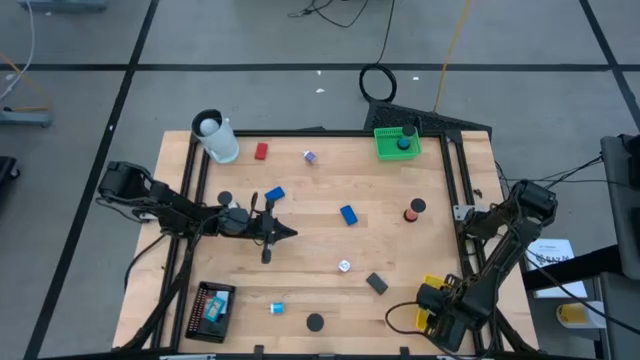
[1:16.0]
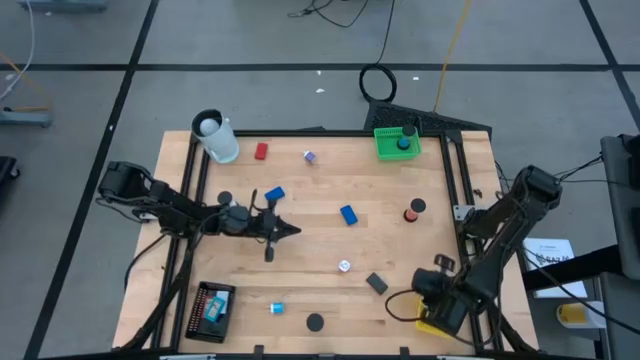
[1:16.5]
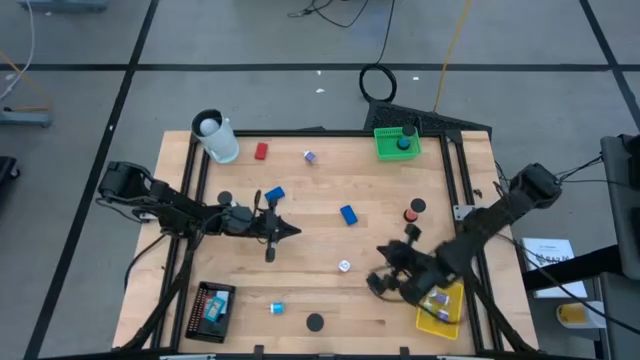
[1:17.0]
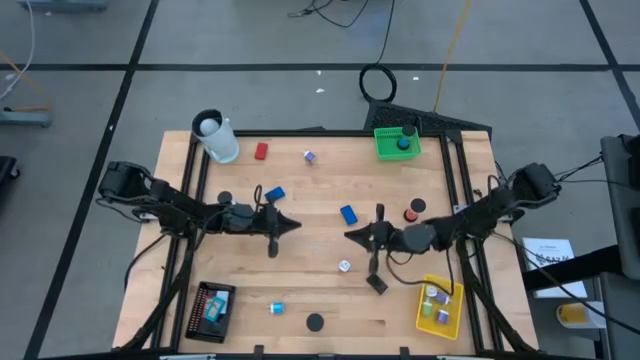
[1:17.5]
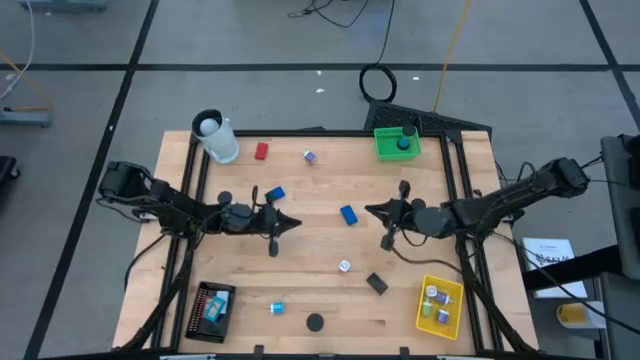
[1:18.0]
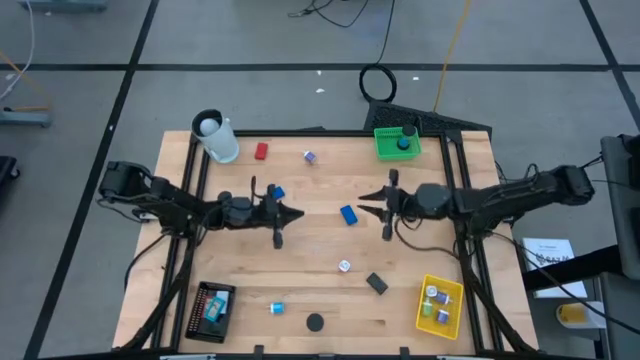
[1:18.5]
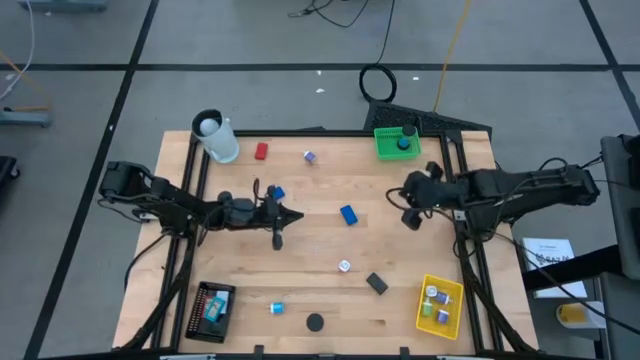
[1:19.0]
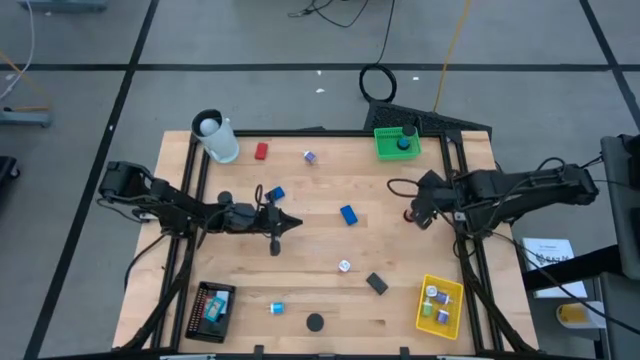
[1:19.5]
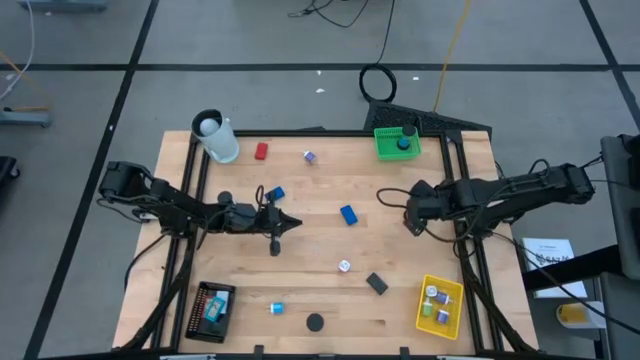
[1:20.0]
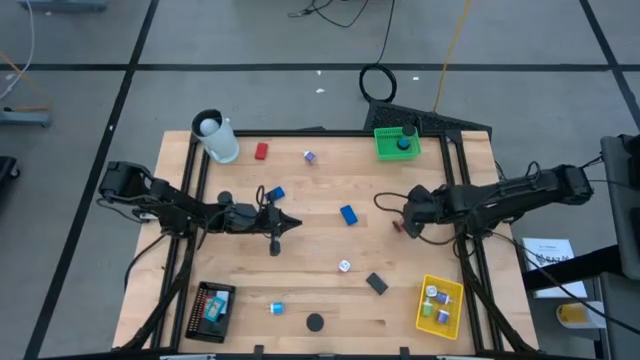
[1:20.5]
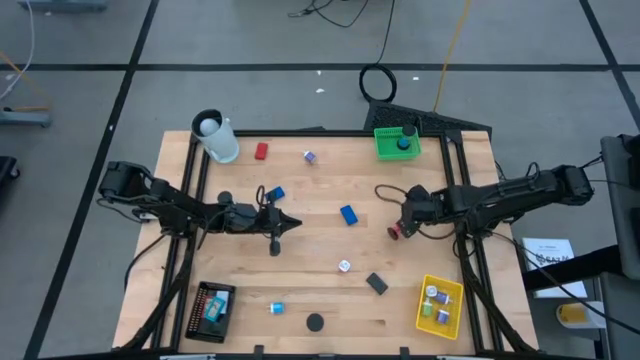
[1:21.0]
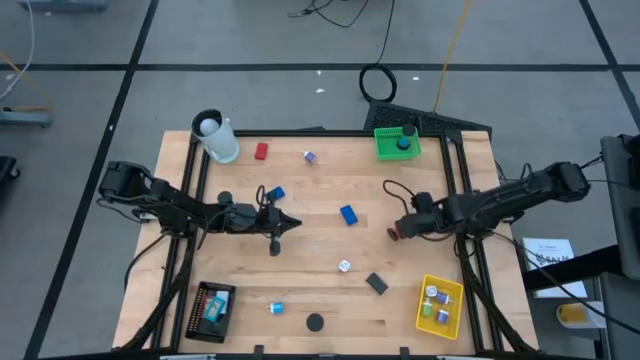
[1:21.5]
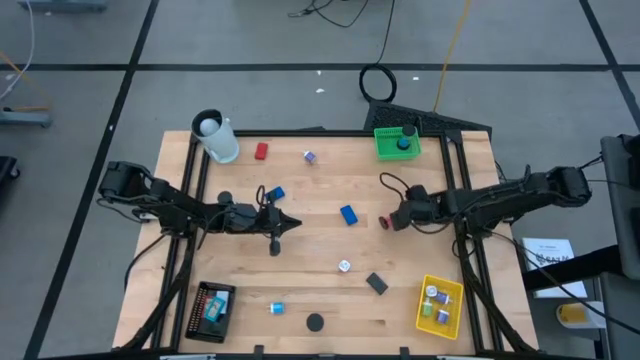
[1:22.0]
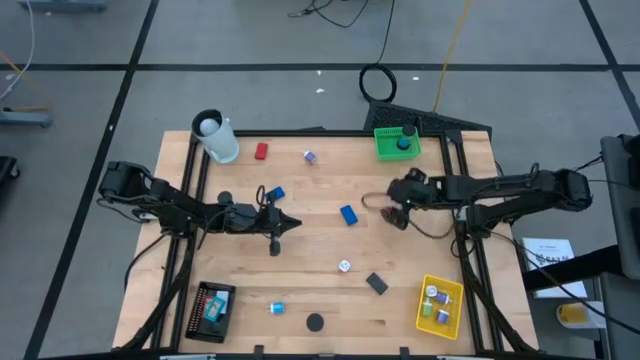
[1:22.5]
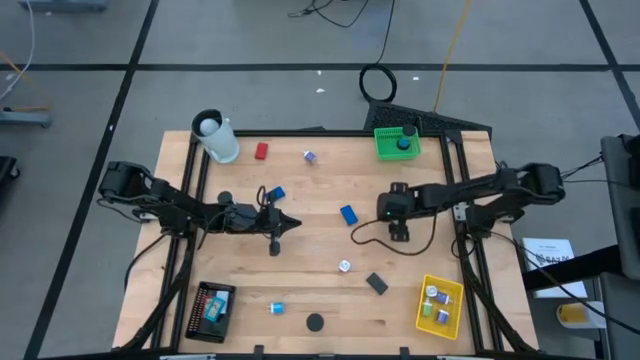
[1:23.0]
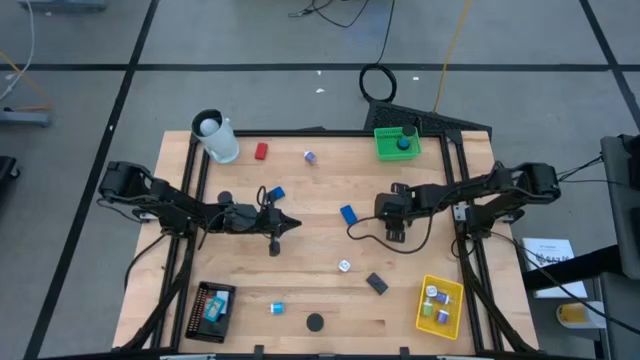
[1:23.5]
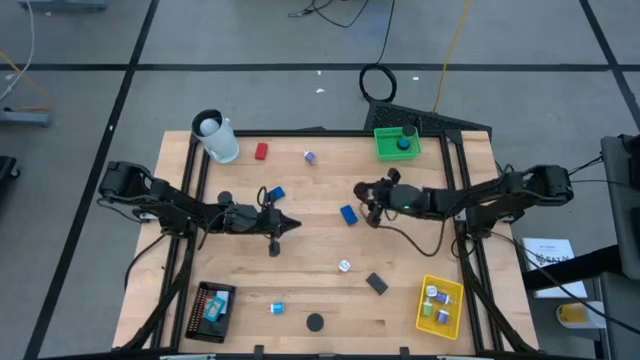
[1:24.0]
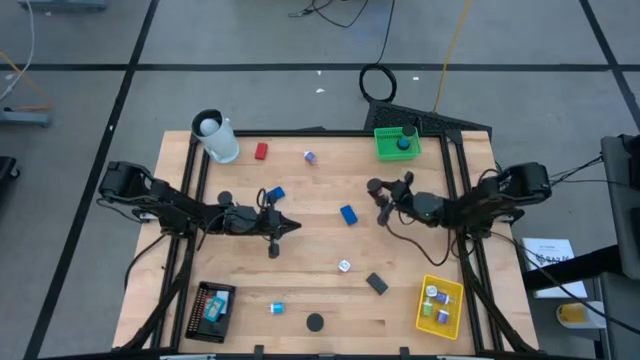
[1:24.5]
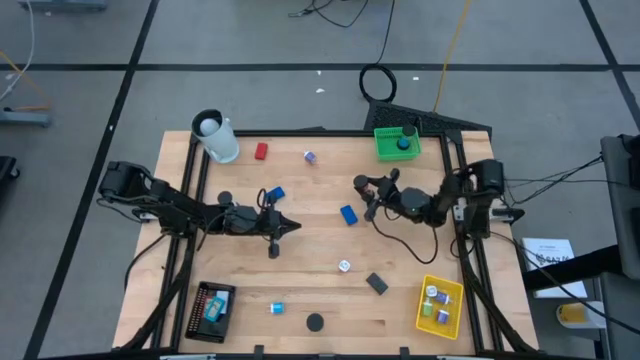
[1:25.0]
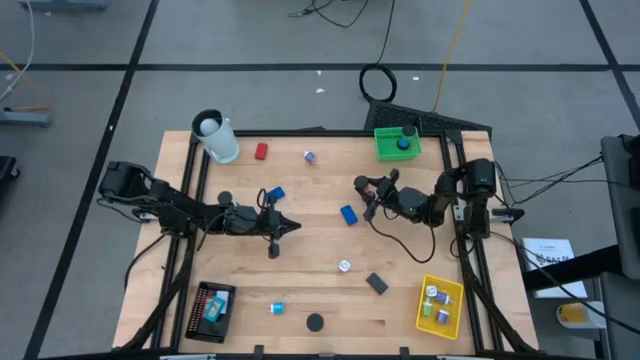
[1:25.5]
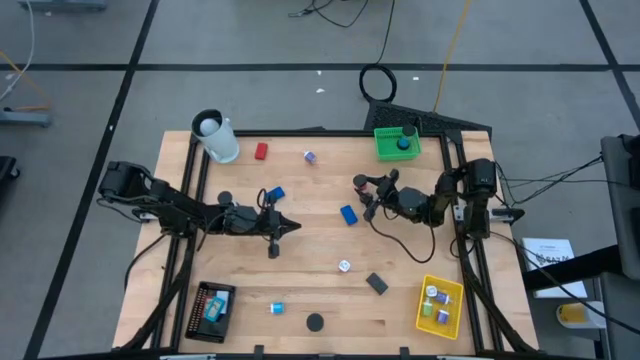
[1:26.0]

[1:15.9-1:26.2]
Task: Pick & Place Office items
Put the red hourglass into the green bin

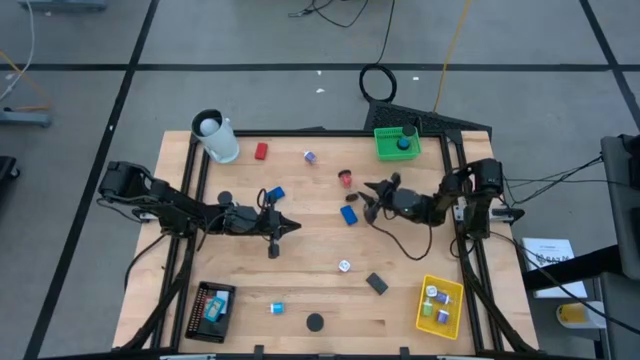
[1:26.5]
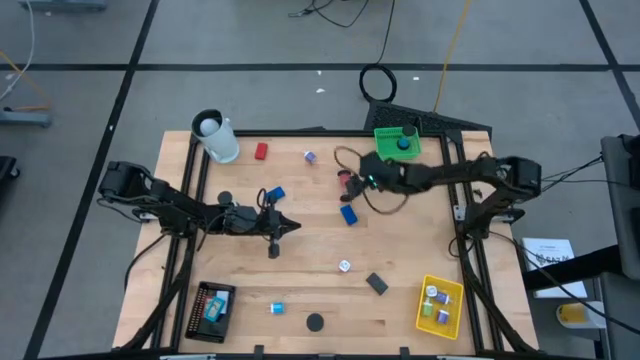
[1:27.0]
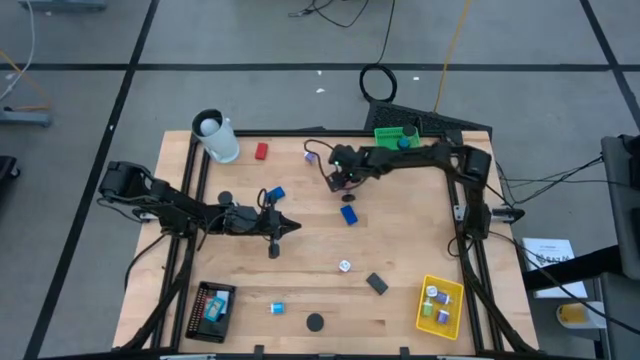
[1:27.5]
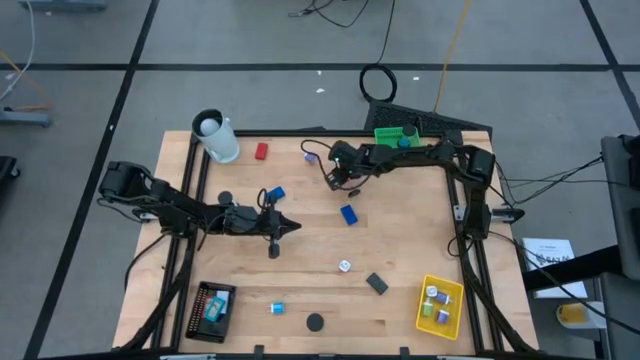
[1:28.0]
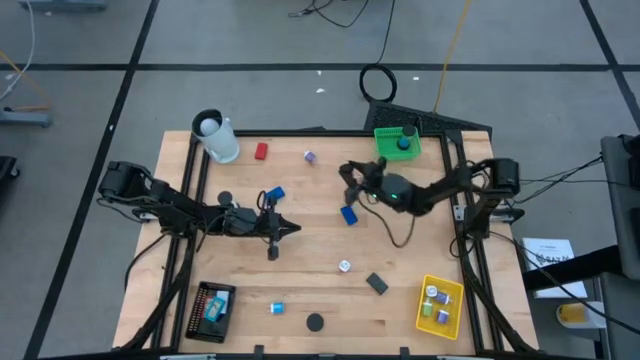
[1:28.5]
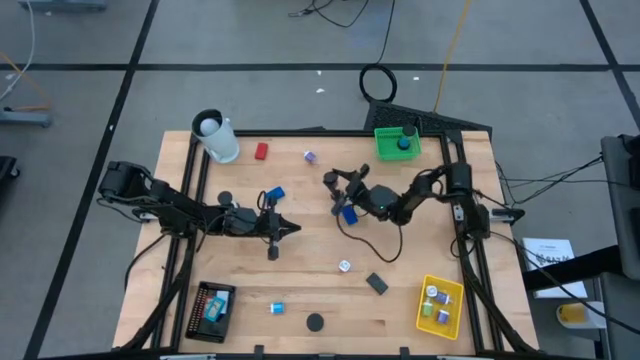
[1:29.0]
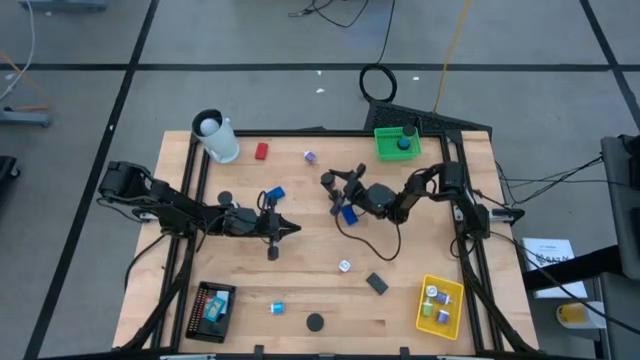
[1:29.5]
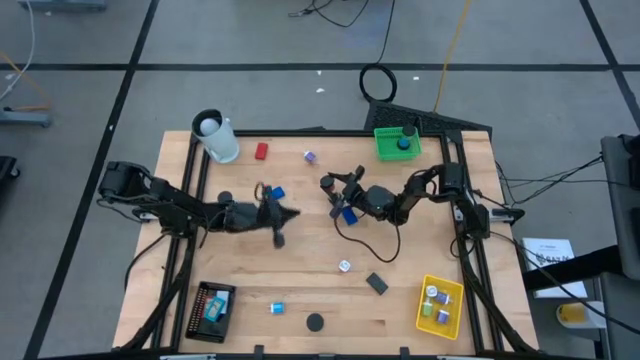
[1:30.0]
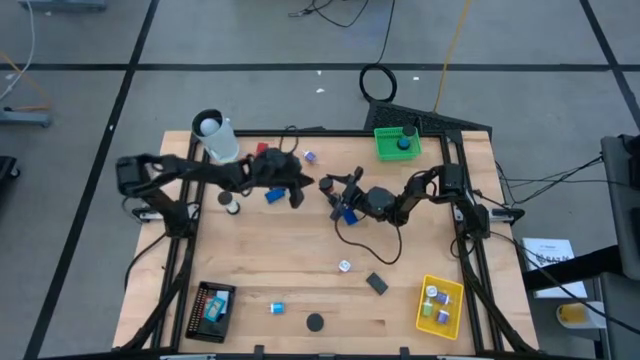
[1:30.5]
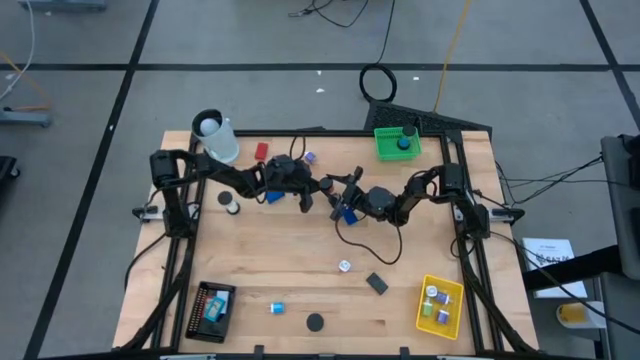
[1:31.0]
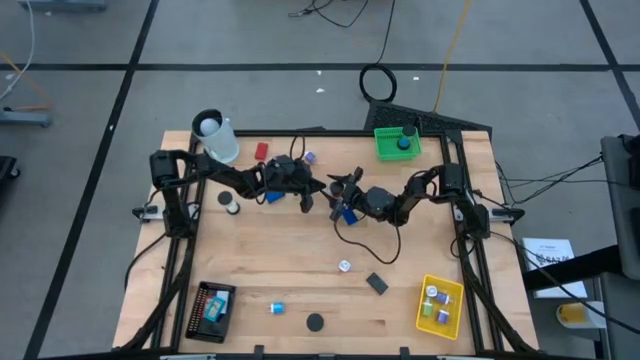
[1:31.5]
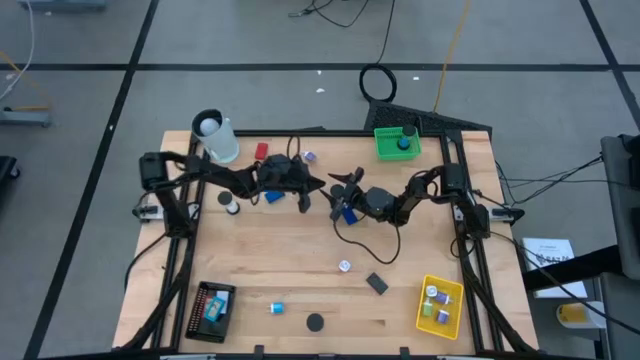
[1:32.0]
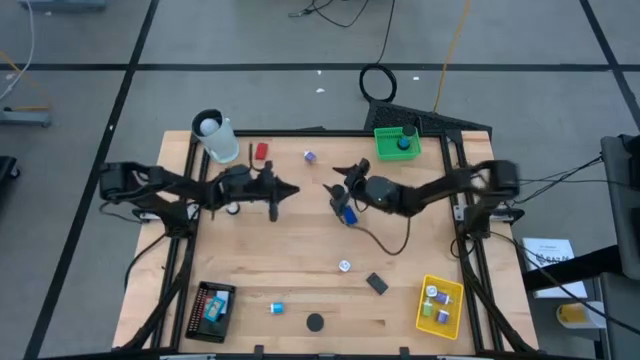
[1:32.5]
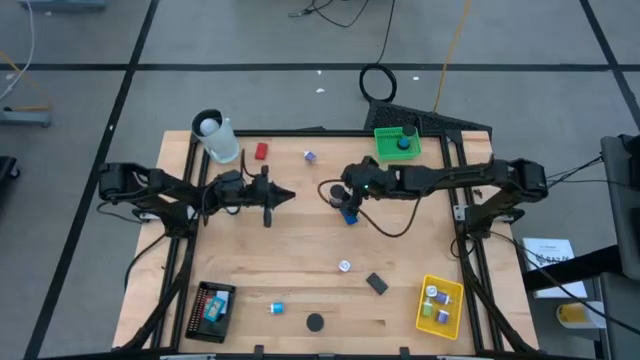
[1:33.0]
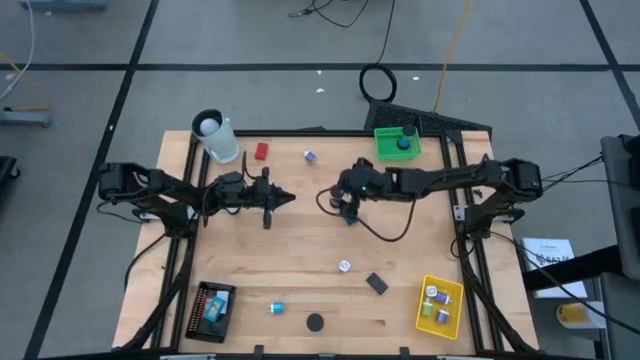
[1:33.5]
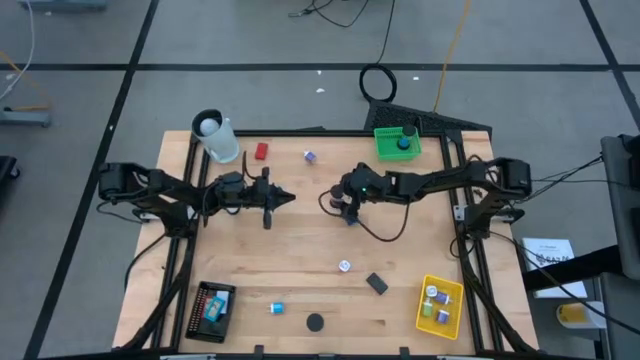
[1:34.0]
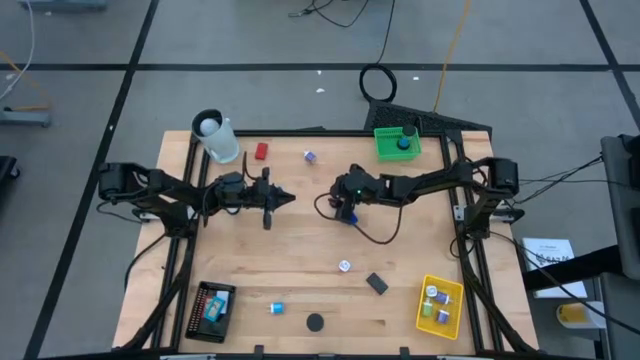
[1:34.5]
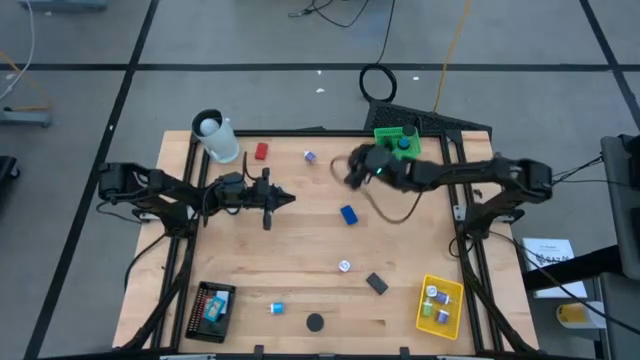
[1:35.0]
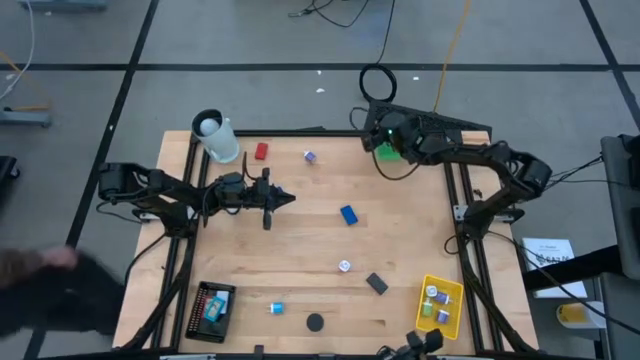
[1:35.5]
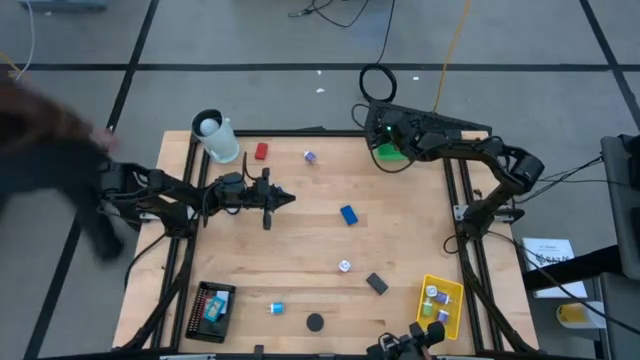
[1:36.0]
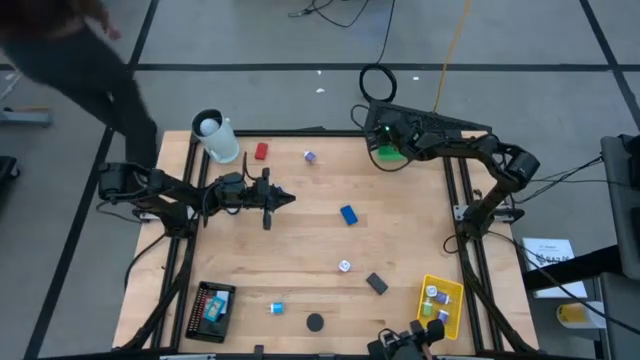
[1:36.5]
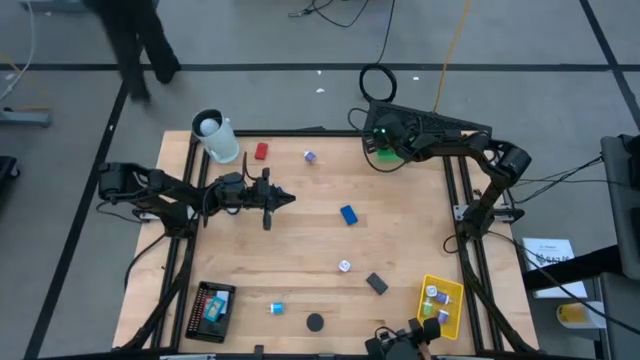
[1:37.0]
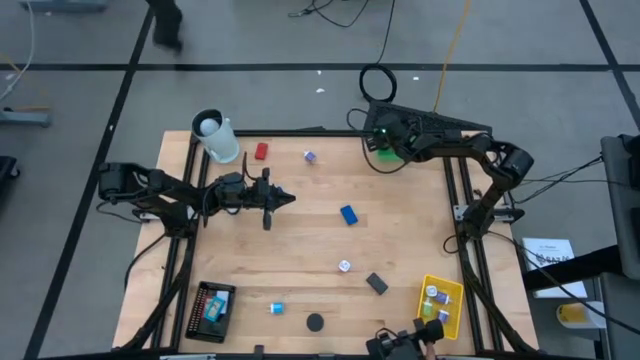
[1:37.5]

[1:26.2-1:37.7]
Put the red hourglass into the green bin
